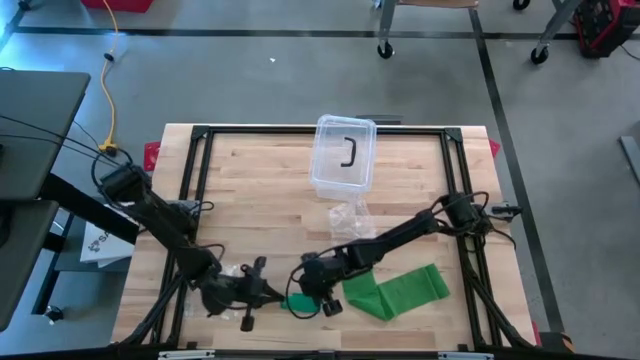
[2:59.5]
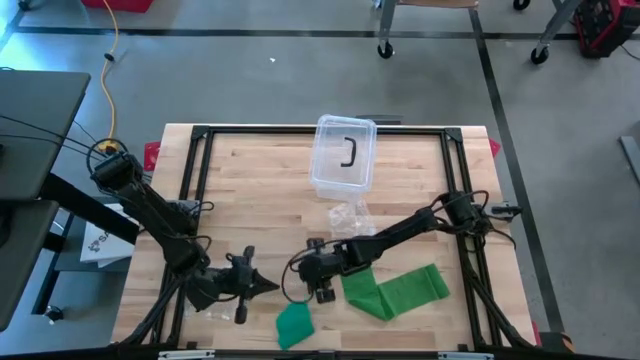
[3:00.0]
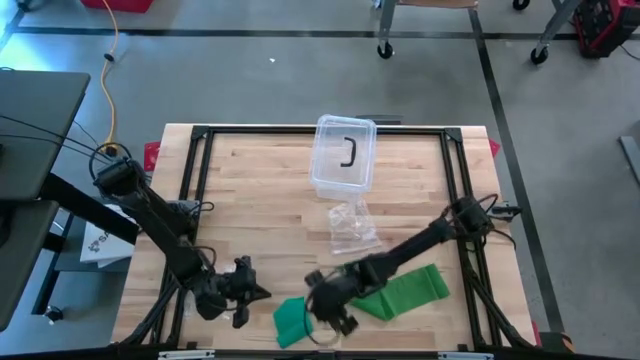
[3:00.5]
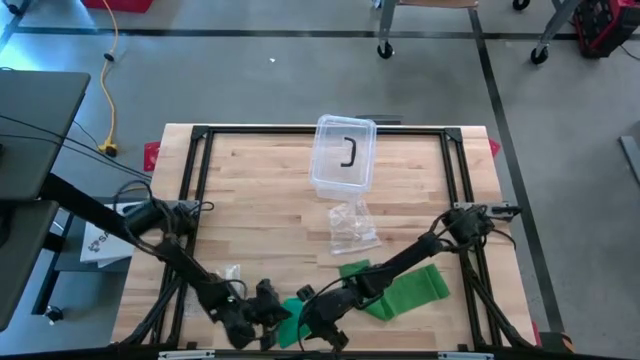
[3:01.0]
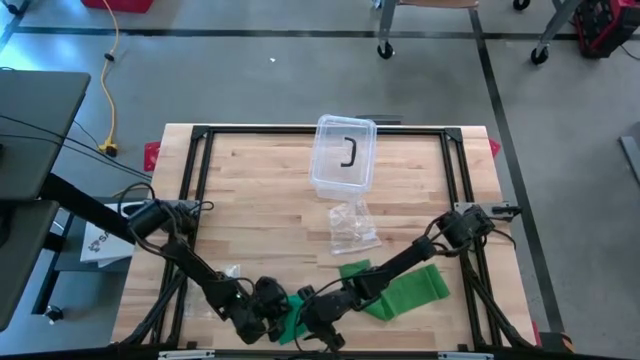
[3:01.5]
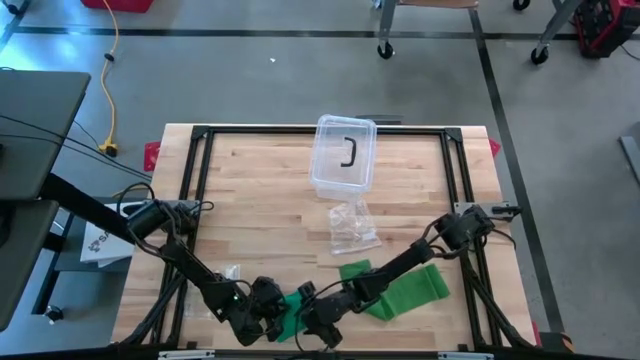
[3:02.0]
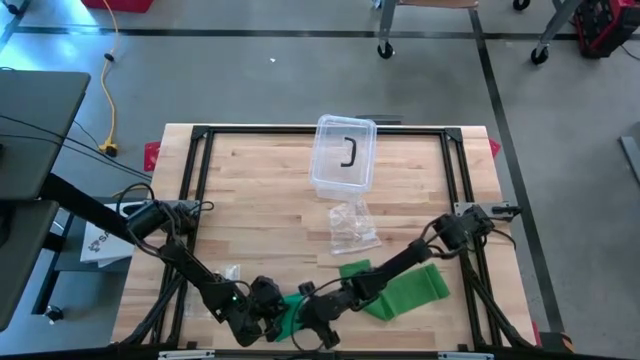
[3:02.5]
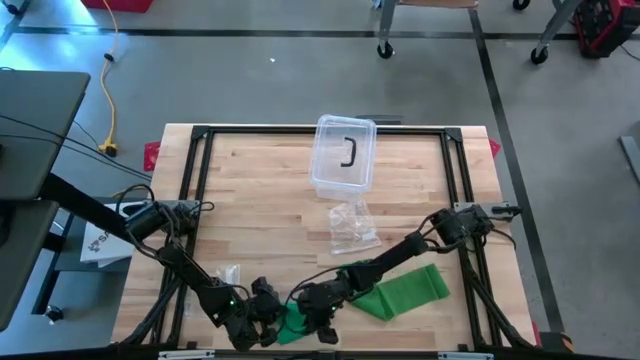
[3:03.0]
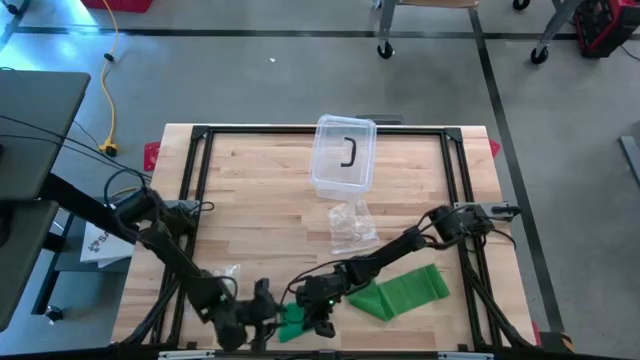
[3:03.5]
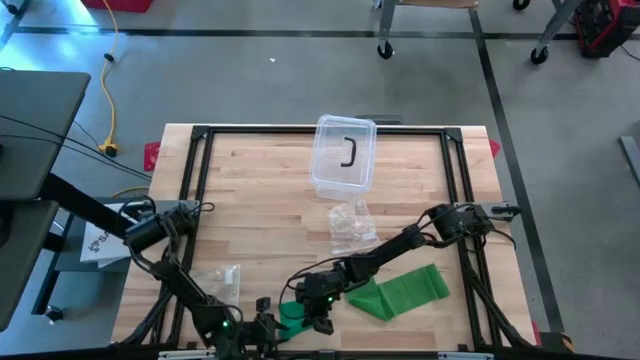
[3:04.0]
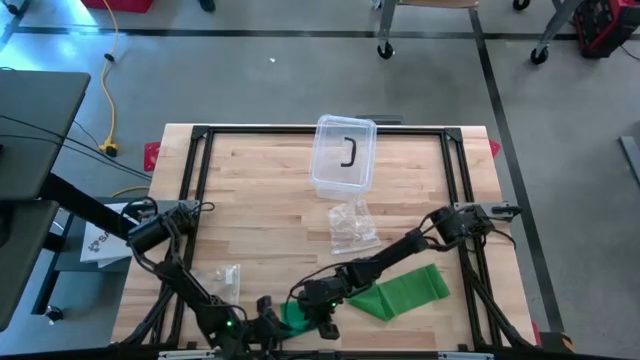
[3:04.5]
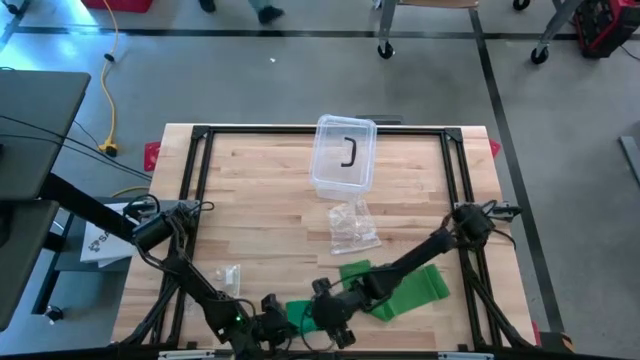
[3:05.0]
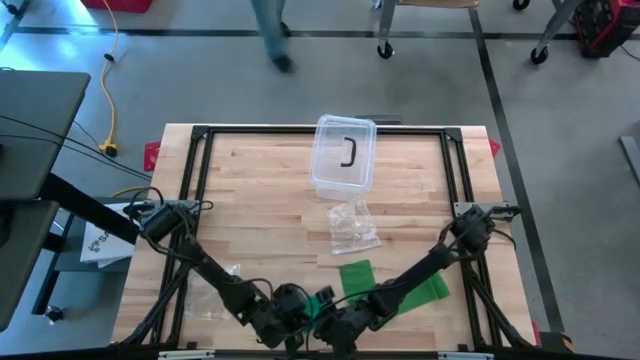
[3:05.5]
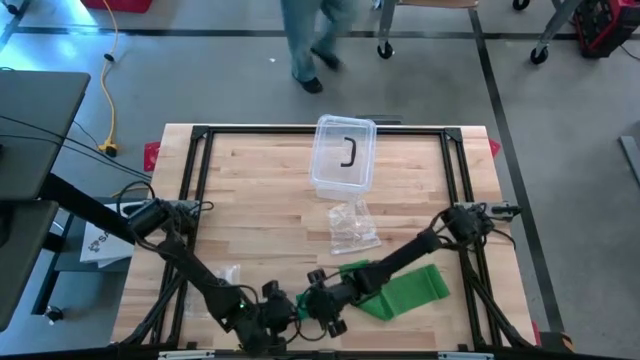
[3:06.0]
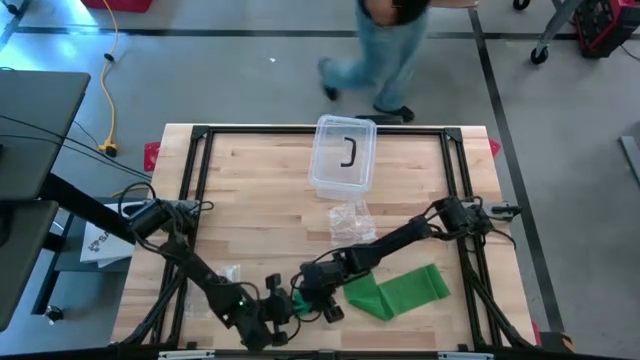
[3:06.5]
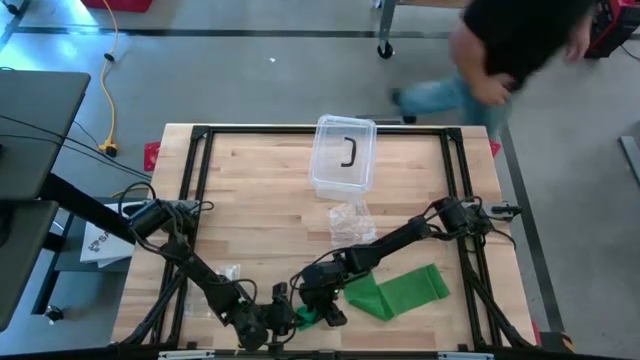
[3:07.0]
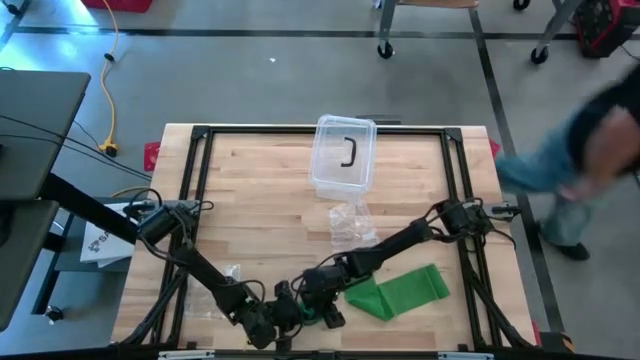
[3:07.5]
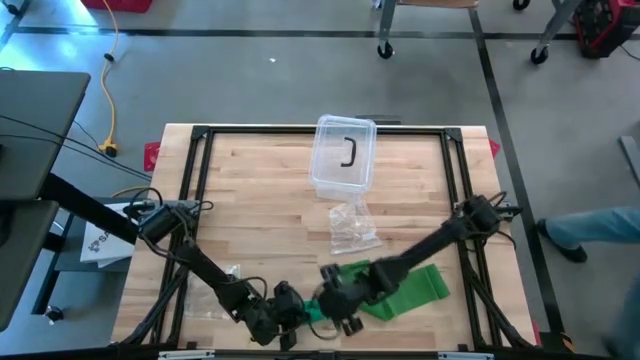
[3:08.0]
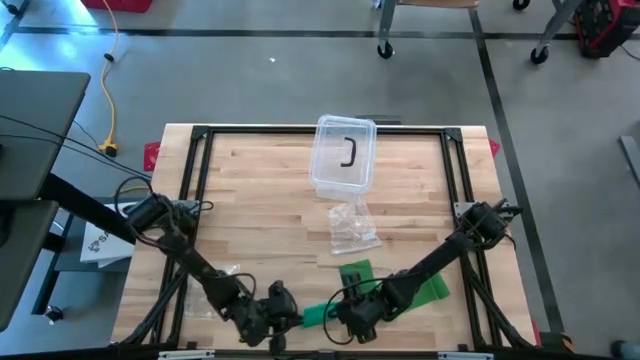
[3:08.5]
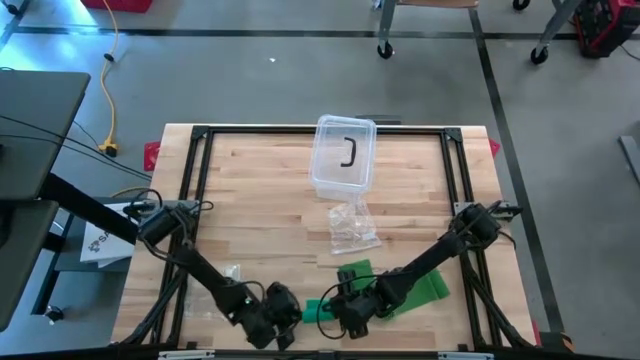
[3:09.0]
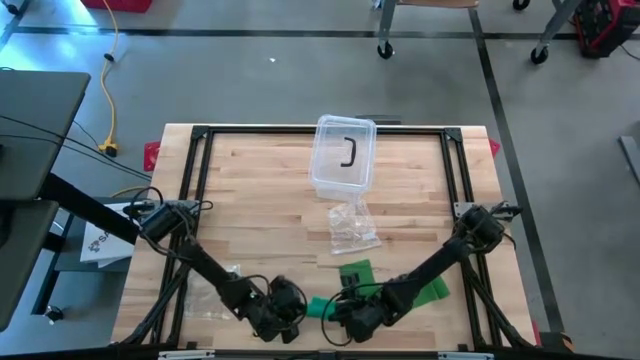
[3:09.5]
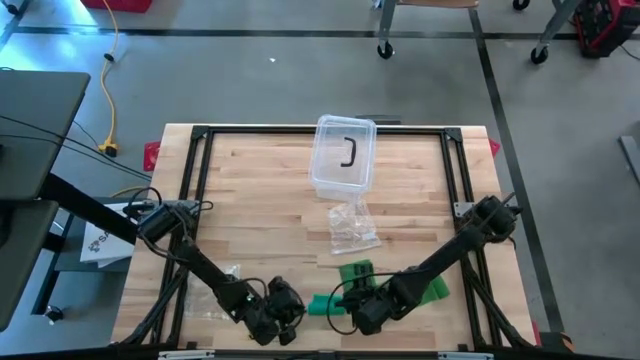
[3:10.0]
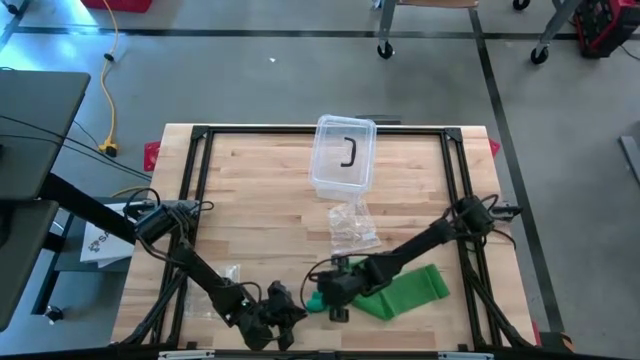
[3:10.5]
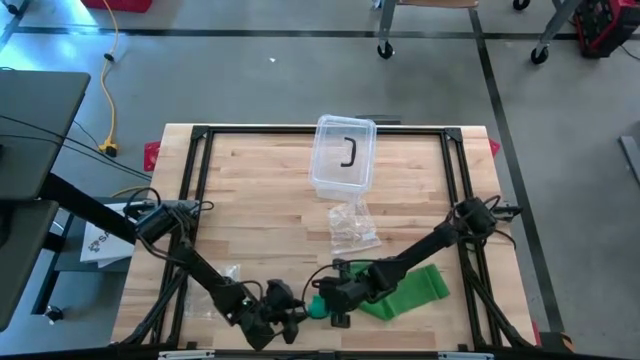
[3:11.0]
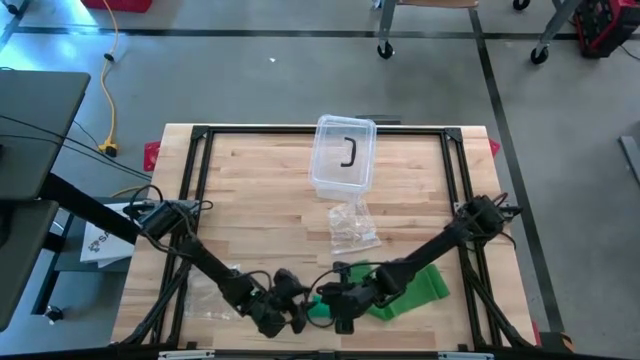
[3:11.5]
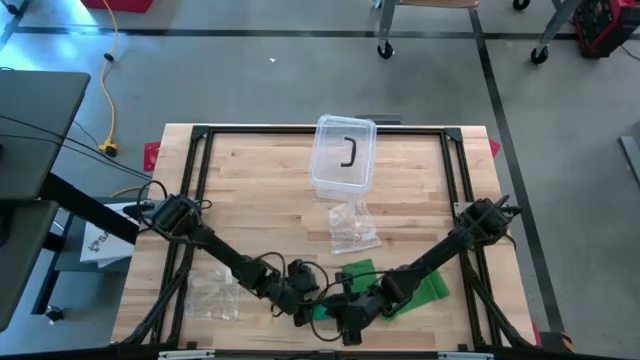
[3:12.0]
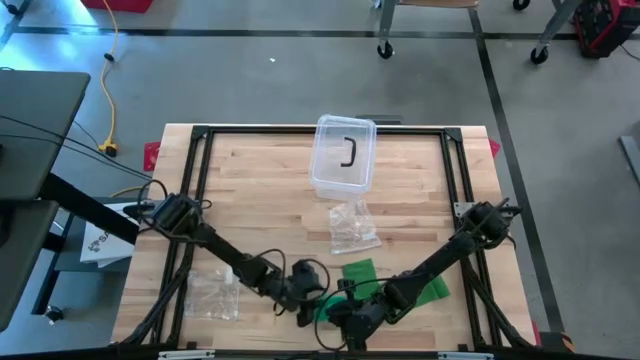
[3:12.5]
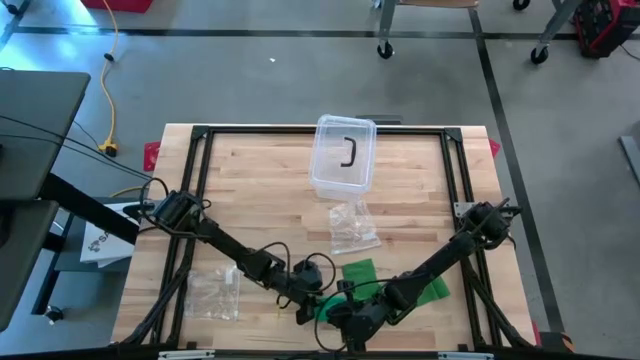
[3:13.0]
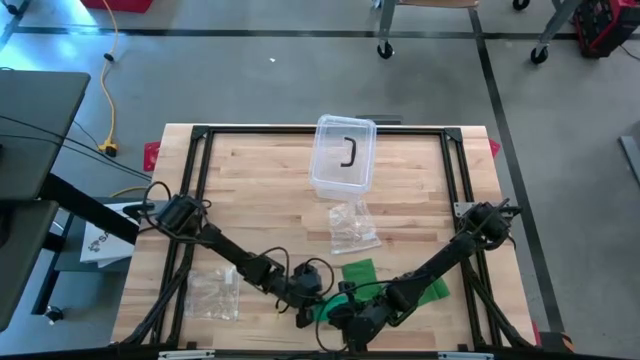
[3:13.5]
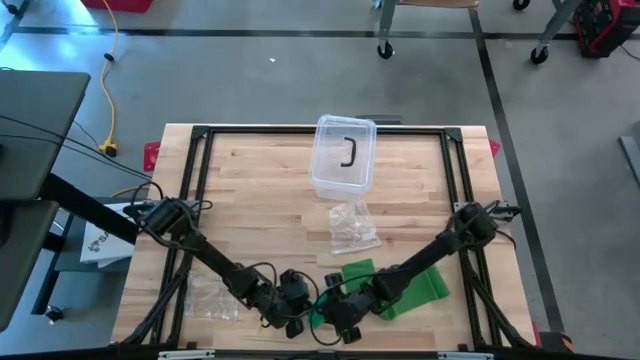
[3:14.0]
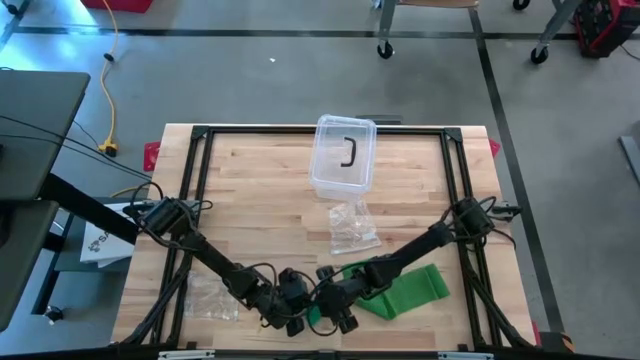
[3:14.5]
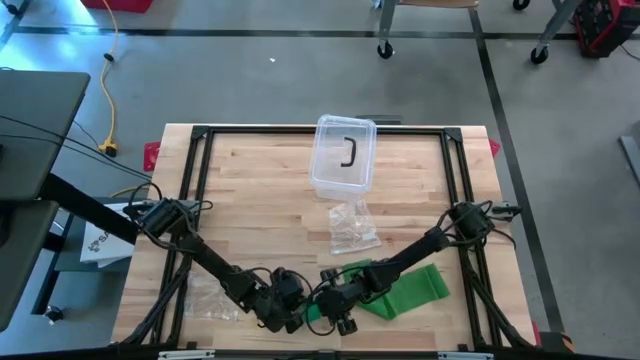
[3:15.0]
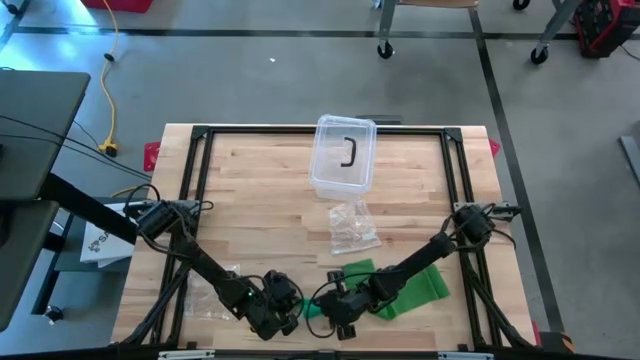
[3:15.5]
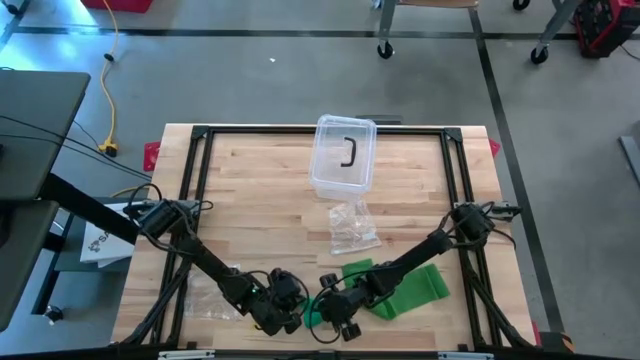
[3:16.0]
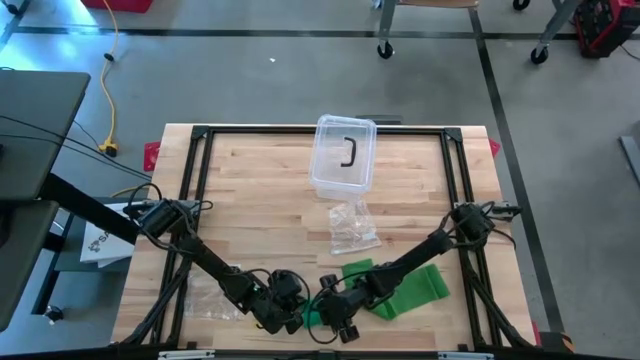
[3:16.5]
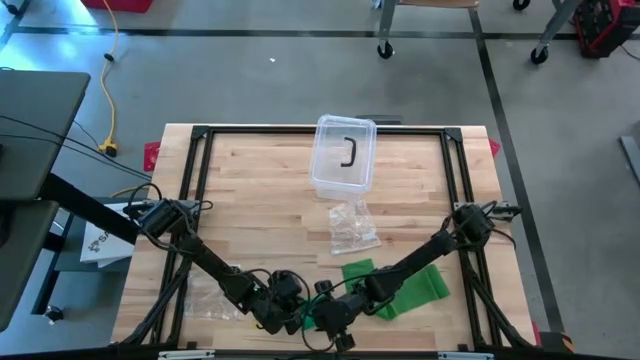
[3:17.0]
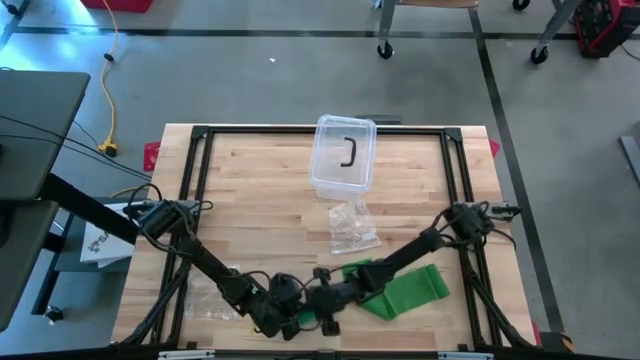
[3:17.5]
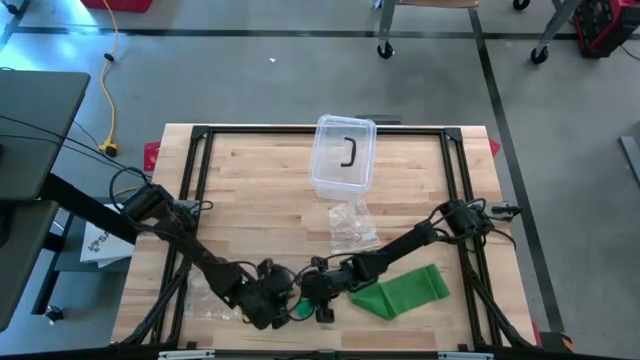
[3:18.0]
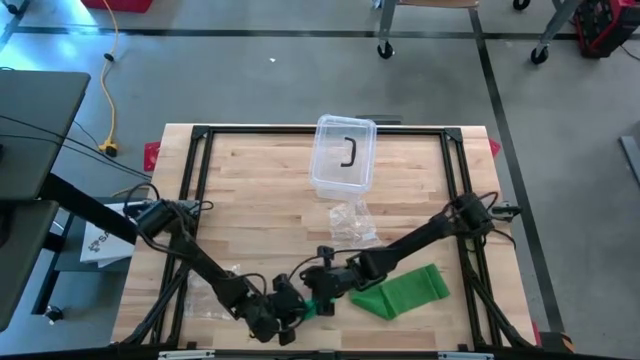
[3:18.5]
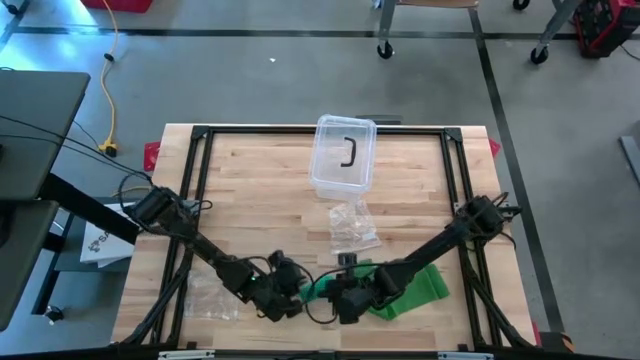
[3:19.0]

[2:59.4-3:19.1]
Task: Roll bandage
Roll the blue bandage
